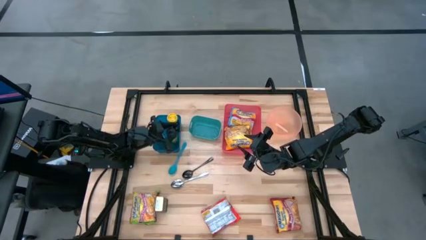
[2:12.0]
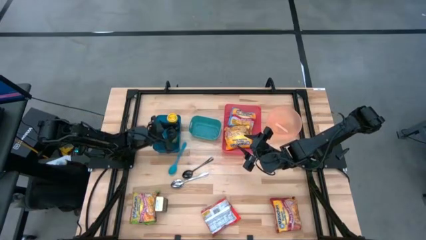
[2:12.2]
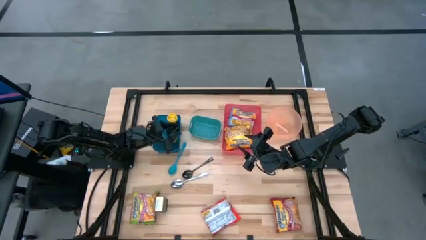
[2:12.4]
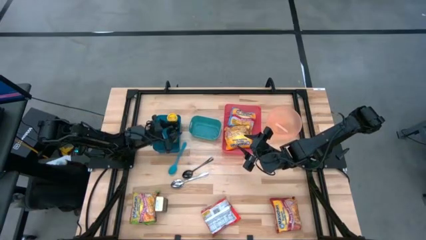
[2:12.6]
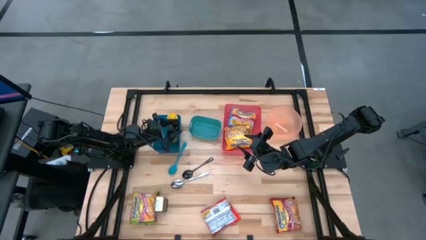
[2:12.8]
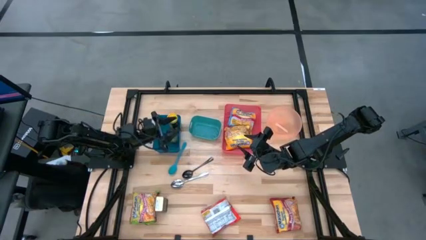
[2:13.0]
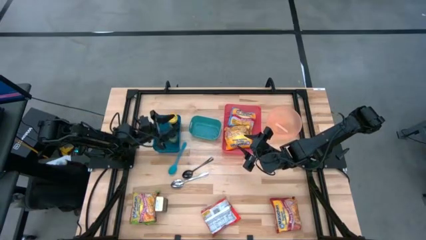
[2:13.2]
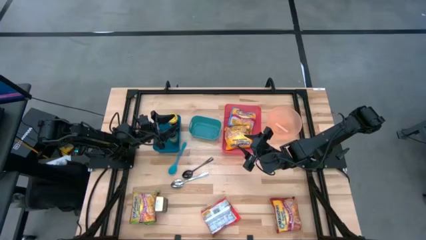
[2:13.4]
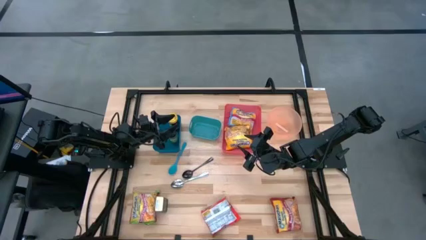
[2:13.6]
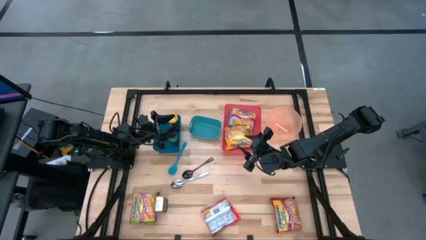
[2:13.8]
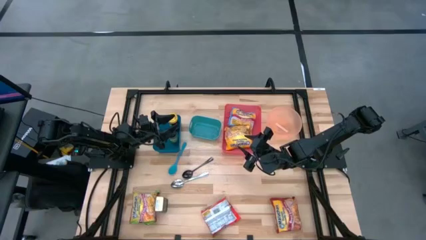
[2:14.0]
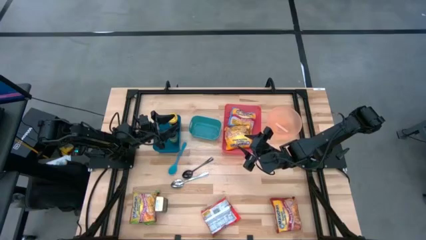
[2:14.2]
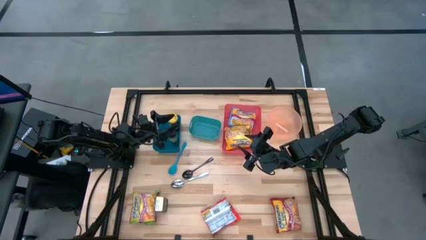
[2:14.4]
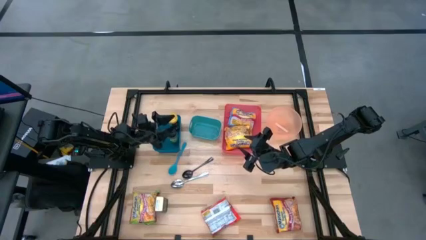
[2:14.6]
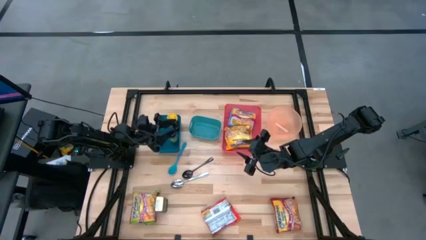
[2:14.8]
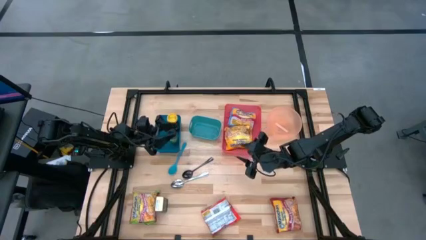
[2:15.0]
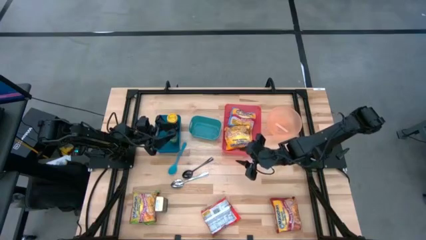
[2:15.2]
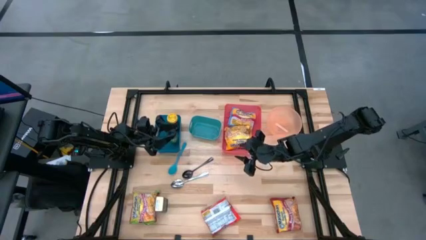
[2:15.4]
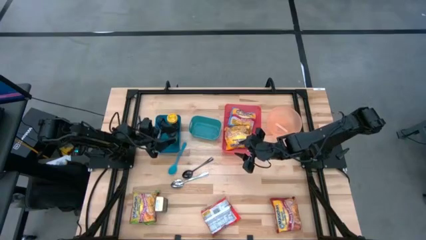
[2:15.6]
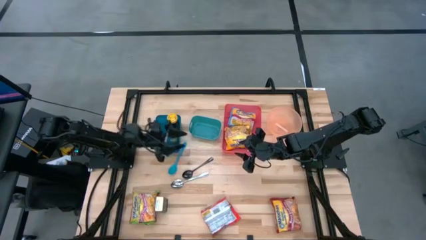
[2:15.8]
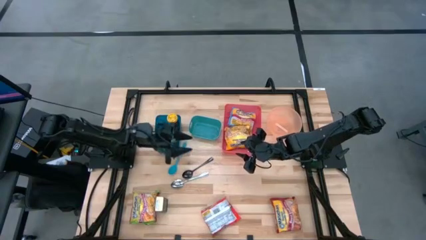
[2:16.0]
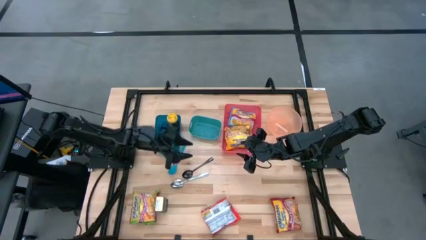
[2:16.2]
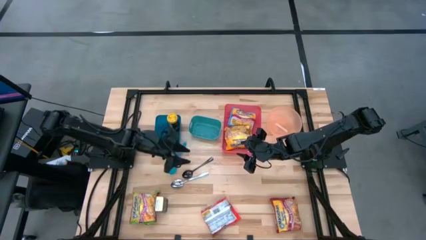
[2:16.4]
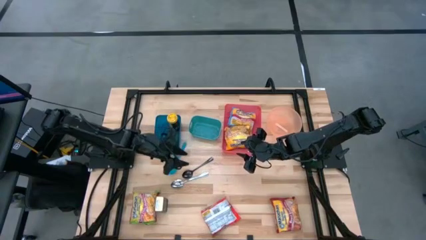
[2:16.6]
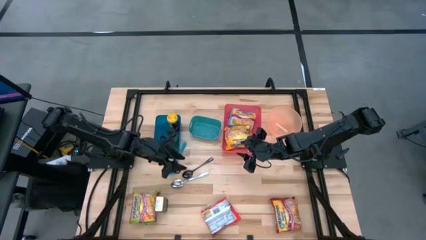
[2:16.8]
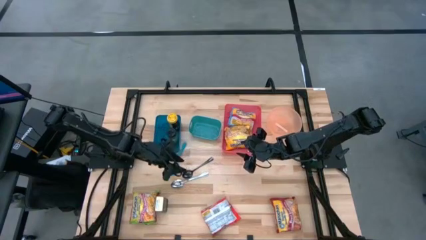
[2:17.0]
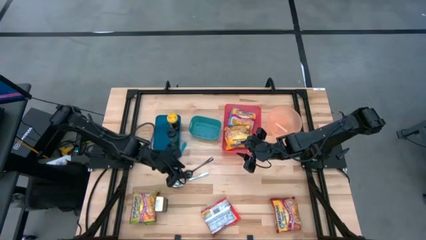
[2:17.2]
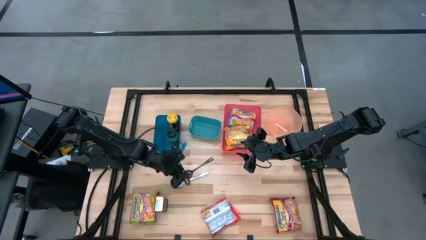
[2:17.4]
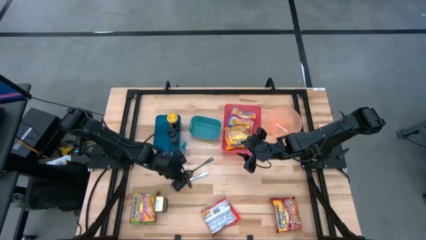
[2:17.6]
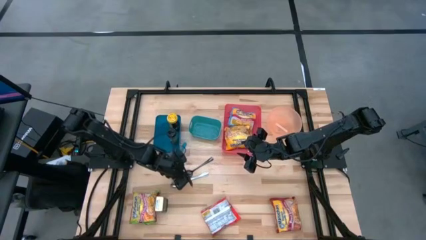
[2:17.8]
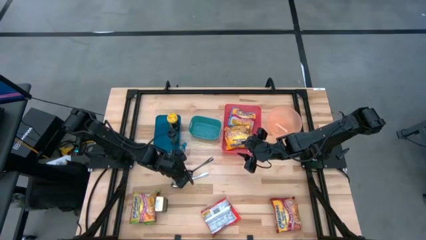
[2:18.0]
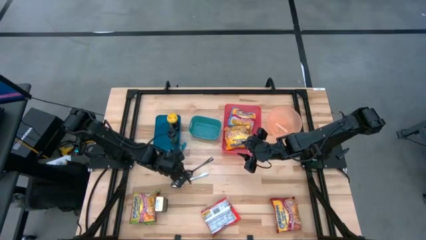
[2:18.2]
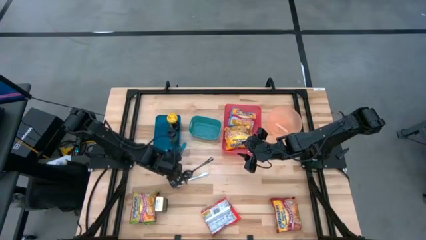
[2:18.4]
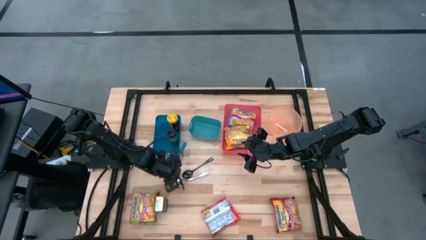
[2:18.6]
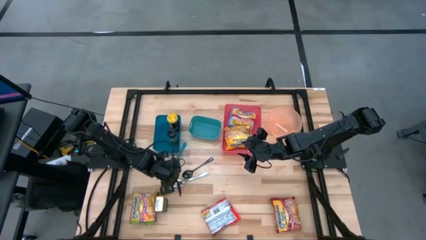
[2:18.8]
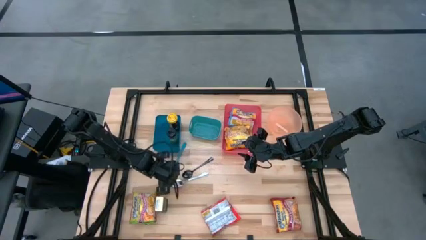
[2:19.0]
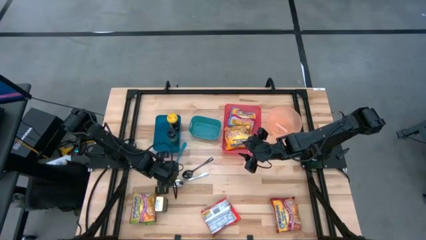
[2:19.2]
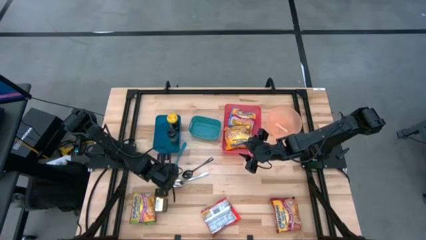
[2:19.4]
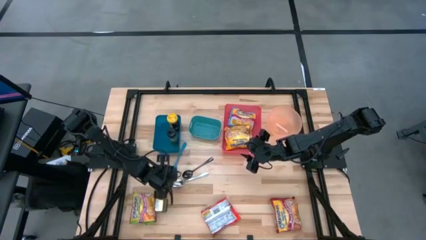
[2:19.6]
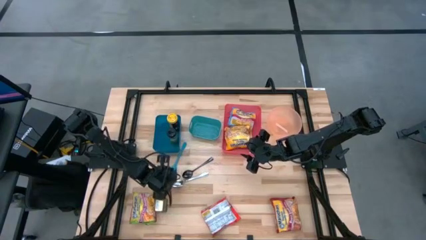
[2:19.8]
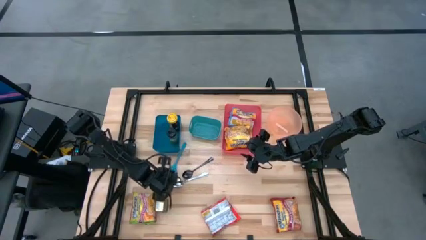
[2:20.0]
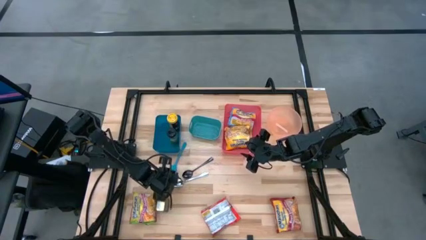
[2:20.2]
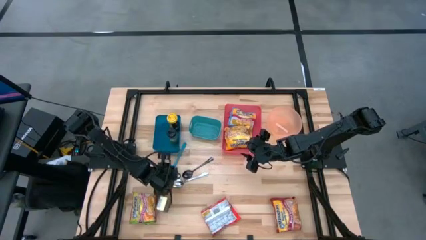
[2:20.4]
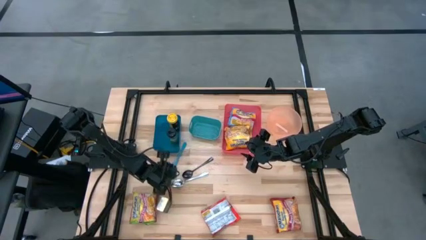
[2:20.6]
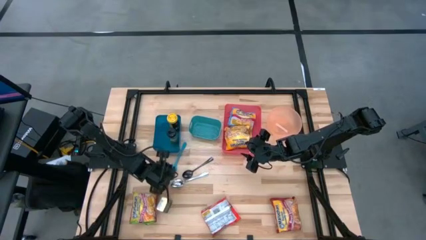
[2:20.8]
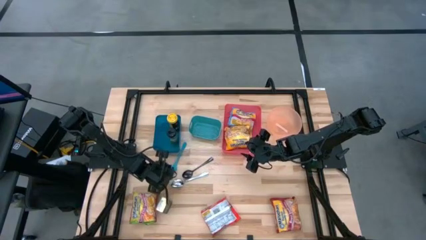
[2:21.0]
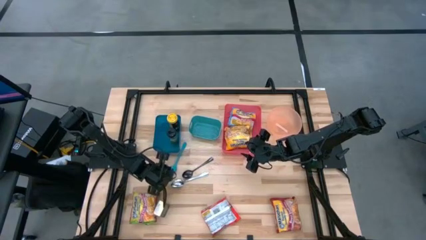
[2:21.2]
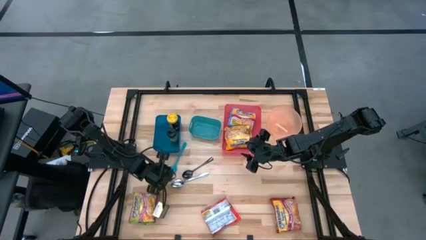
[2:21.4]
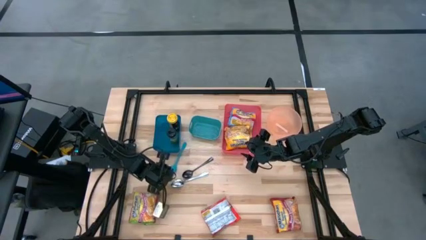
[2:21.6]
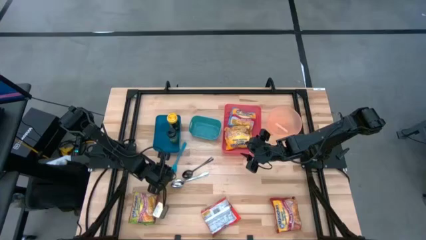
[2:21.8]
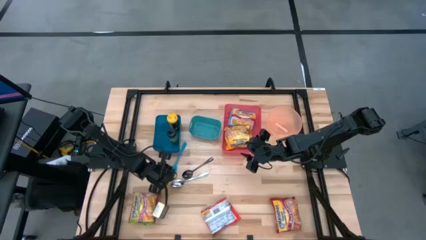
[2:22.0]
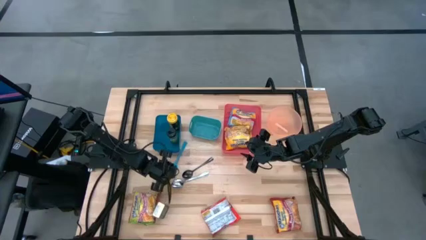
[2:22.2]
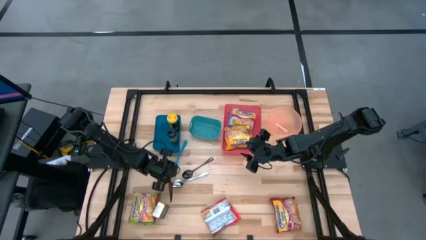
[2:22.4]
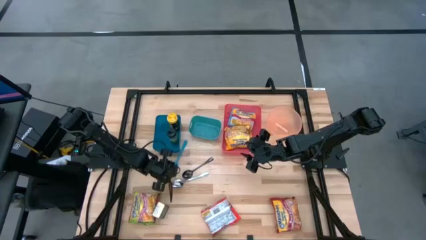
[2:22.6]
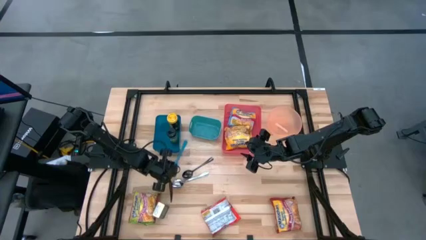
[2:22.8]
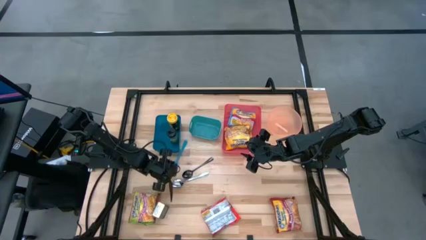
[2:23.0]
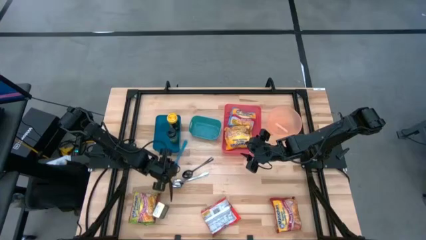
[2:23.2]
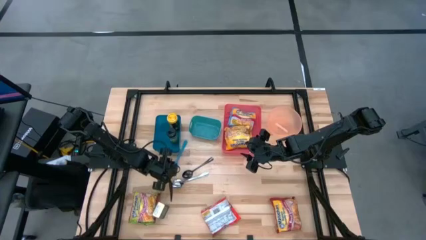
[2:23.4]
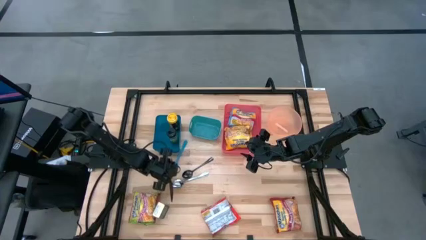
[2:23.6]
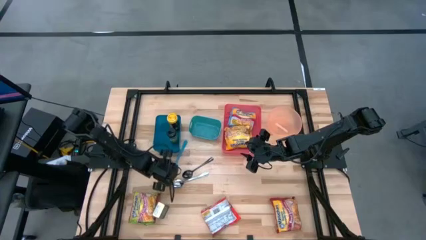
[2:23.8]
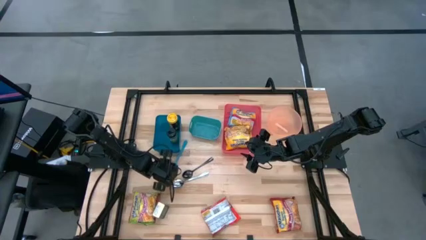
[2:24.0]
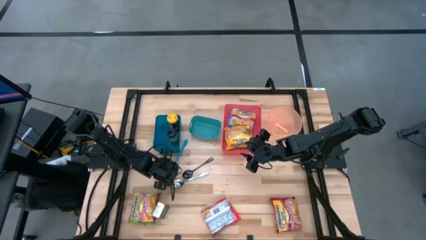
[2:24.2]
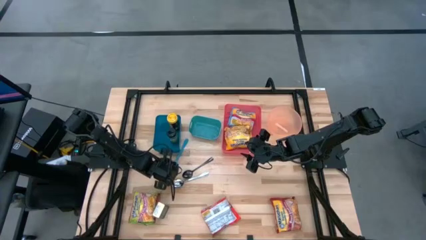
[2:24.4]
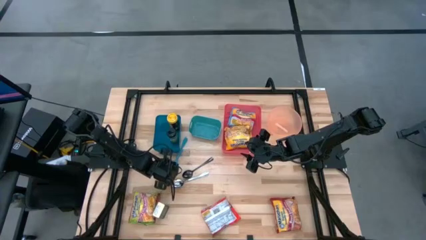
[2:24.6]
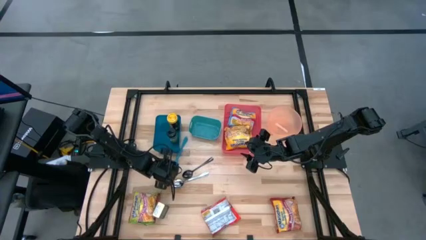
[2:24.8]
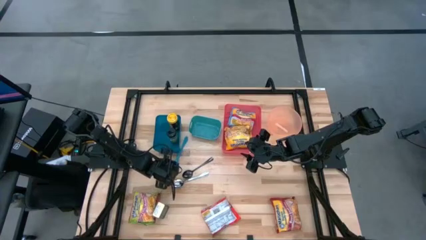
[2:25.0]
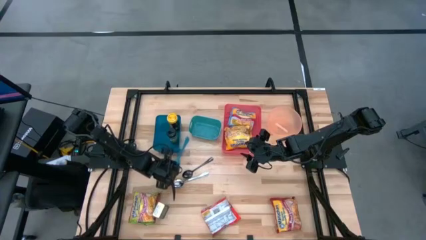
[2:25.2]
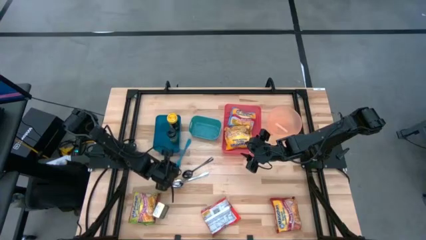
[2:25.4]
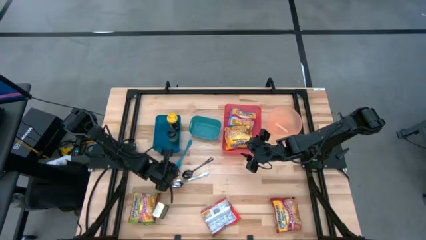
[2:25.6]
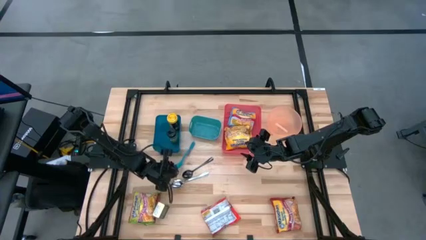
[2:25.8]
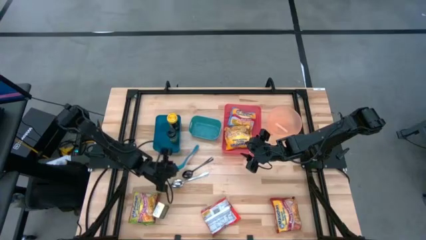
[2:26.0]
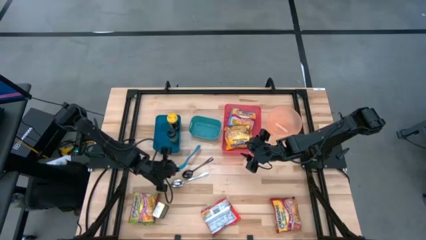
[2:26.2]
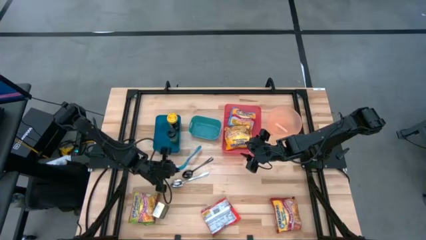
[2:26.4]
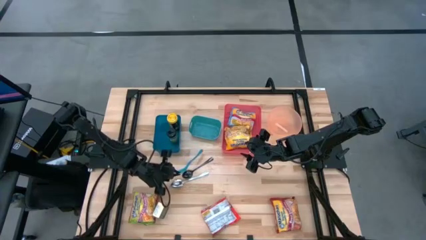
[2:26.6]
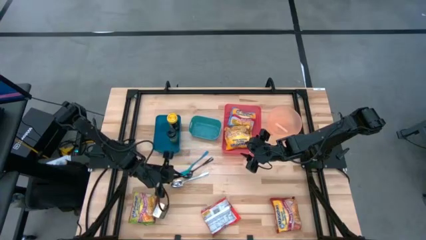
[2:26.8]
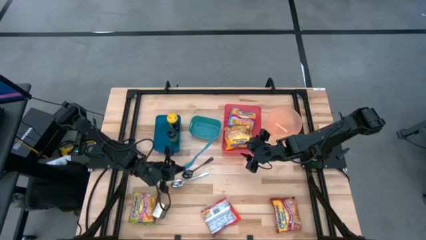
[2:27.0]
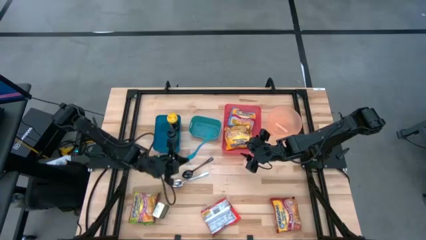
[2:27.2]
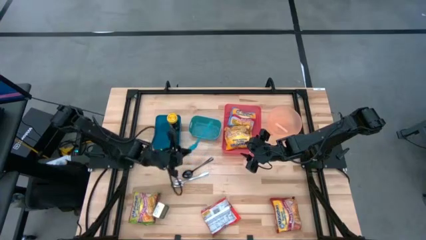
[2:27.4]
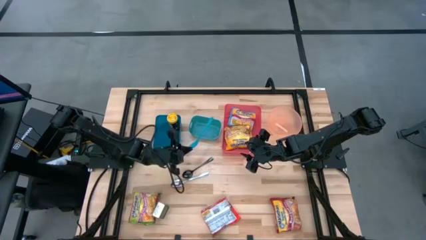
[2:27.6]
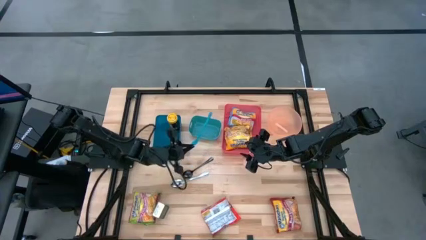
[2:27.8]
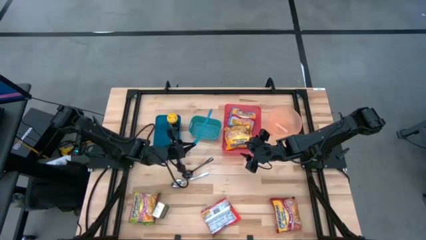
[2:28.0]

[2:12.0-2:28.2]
Task: Pick & Place Food Item
Put the blue baby spoon into the green bin

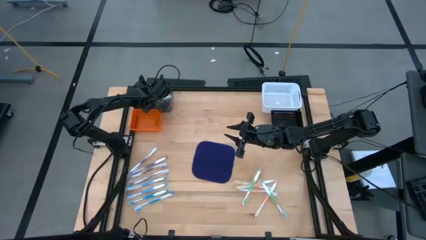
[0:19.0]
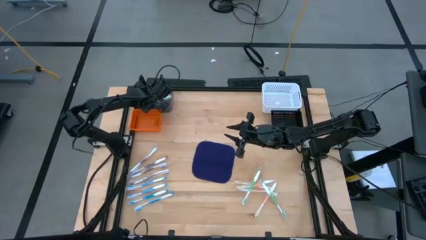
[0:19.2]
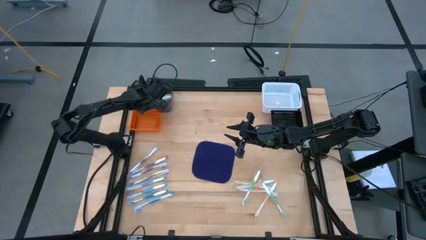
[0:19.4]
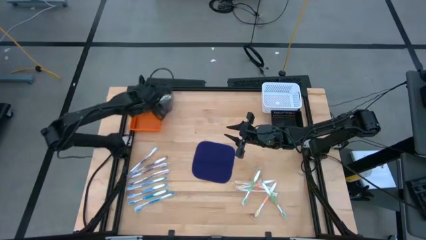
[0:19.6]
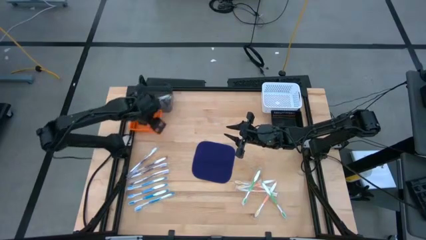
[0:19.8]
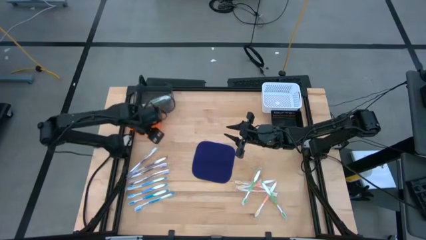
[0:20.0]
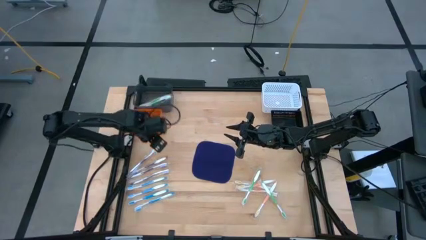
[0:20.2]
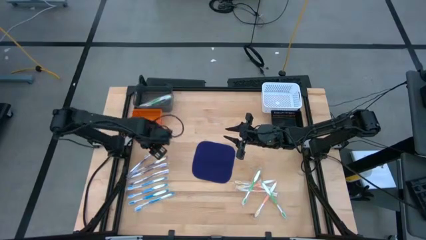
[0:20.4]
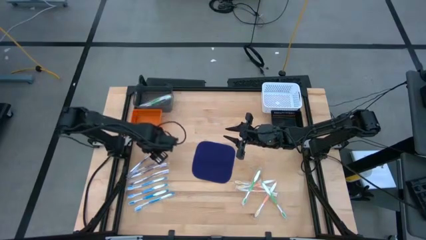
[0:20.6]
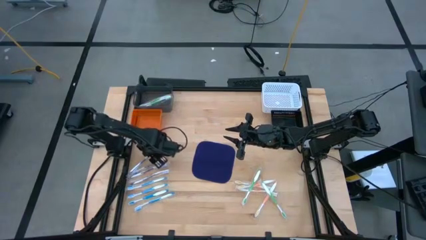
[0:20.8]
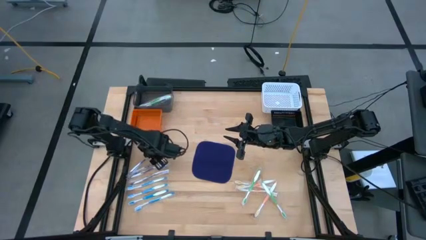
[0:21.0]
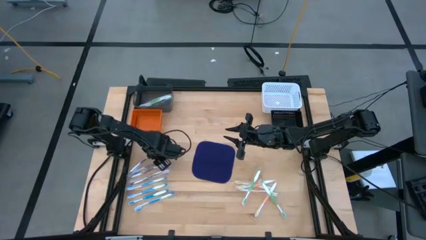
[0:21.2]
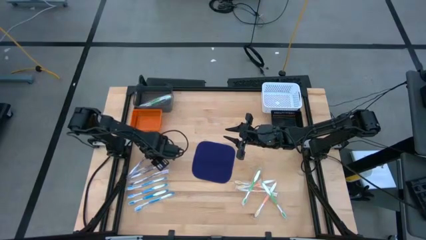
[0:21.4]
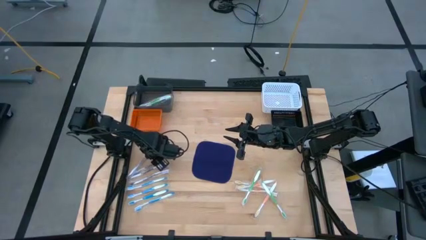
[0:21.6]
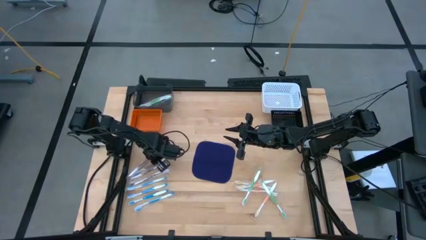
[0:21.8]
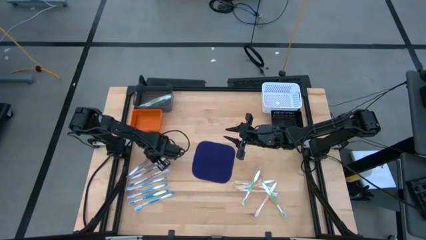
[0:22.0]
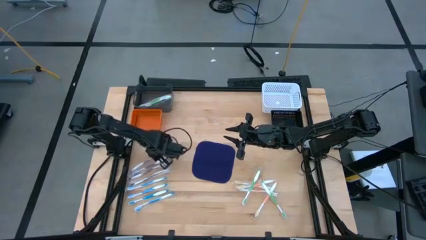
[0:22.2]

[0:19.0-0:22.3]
Task: Pick & Place Toothbrushes
Put the purple toothbrush into the white bin
